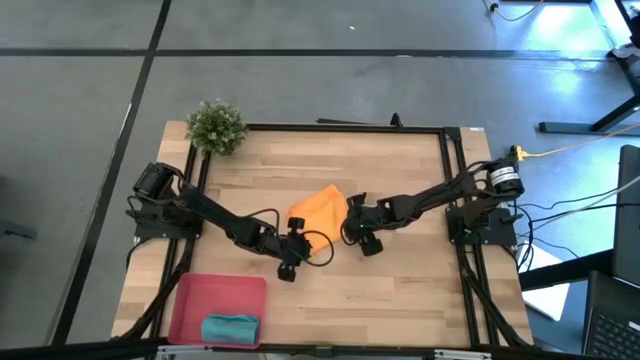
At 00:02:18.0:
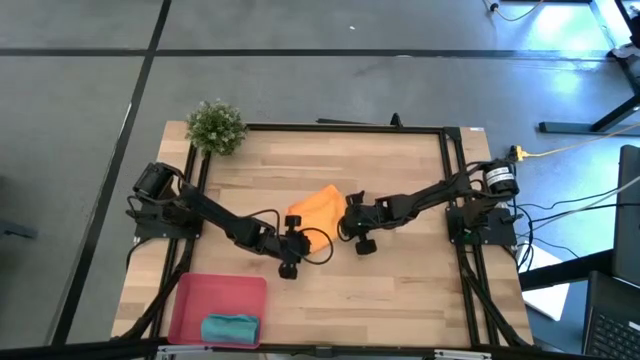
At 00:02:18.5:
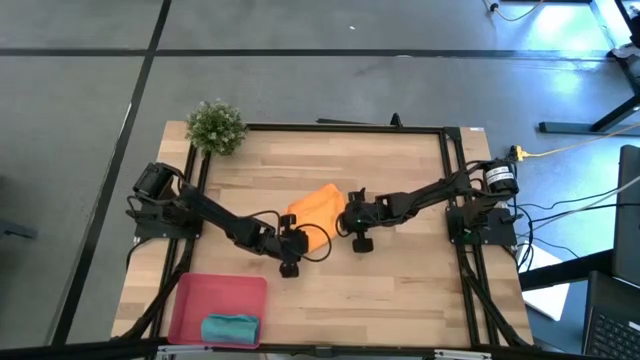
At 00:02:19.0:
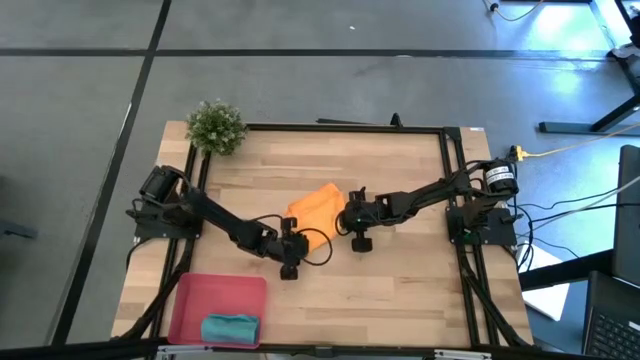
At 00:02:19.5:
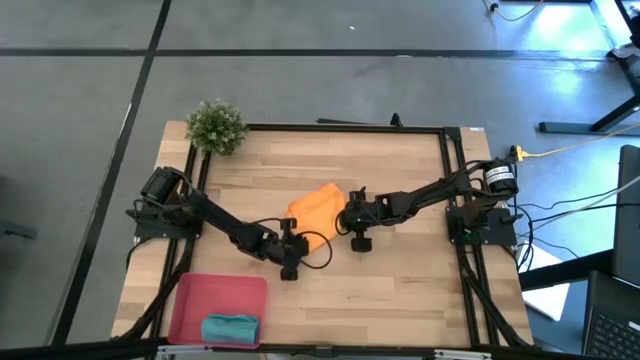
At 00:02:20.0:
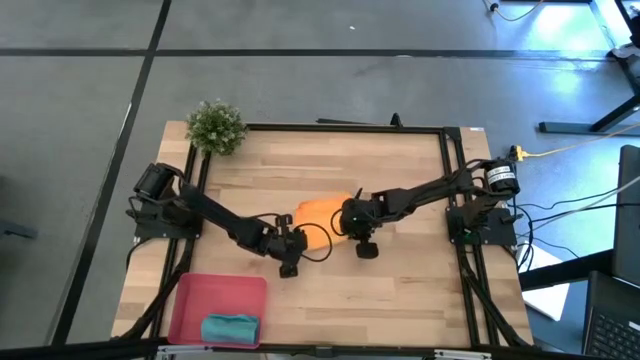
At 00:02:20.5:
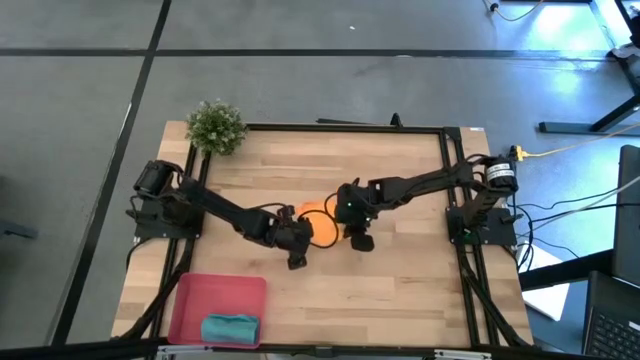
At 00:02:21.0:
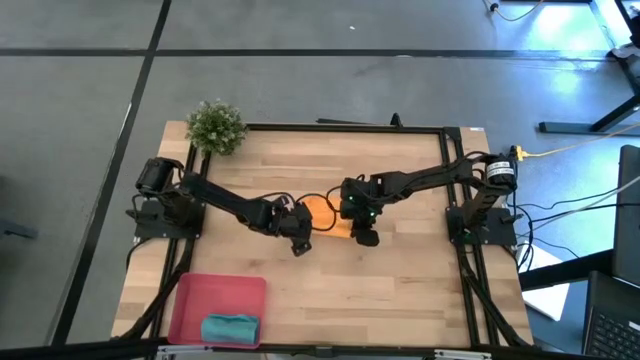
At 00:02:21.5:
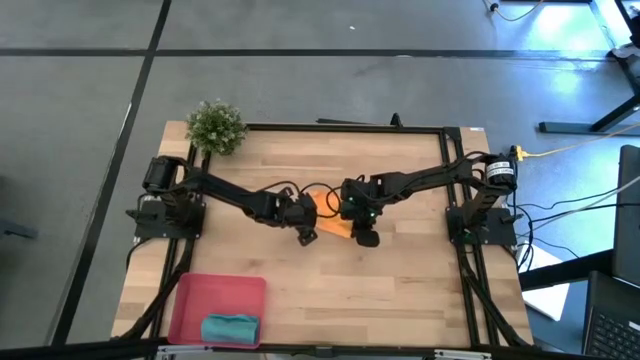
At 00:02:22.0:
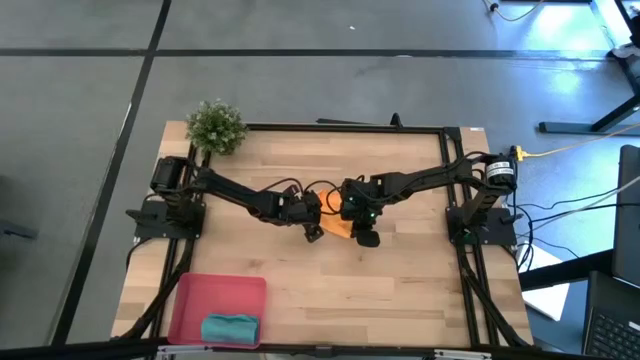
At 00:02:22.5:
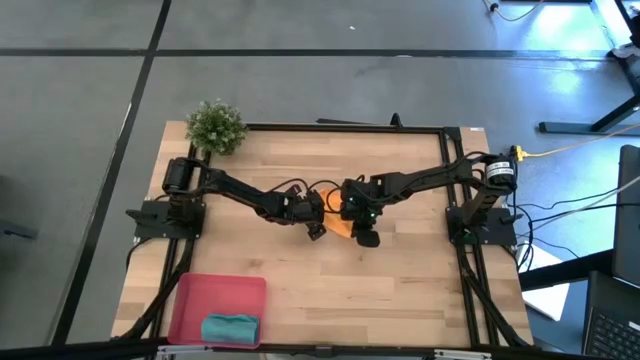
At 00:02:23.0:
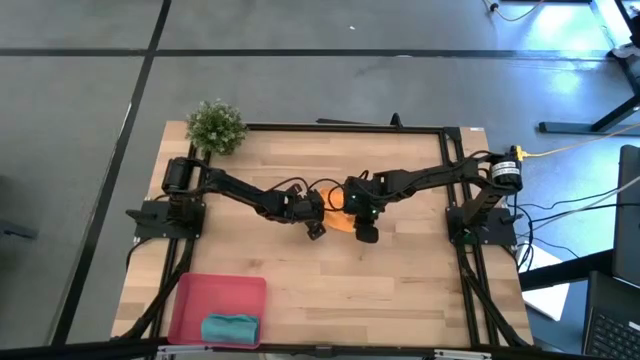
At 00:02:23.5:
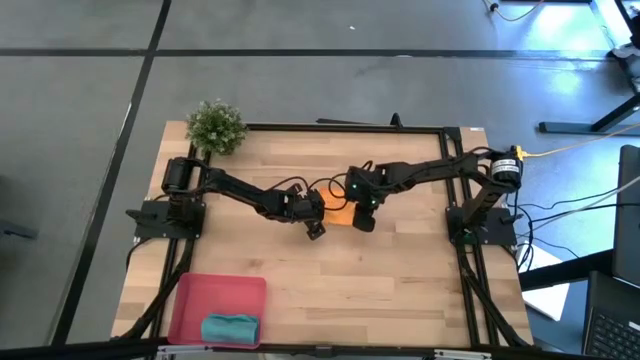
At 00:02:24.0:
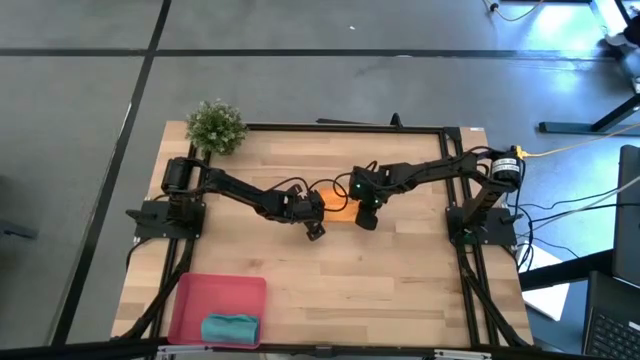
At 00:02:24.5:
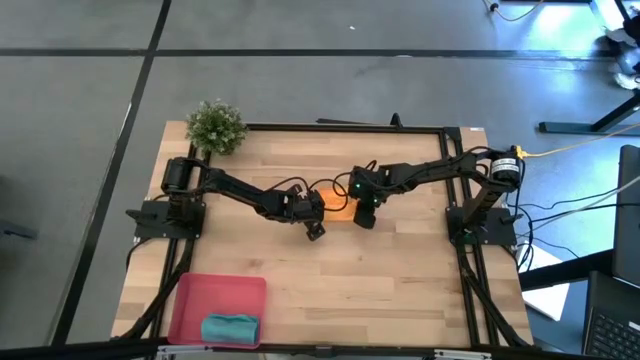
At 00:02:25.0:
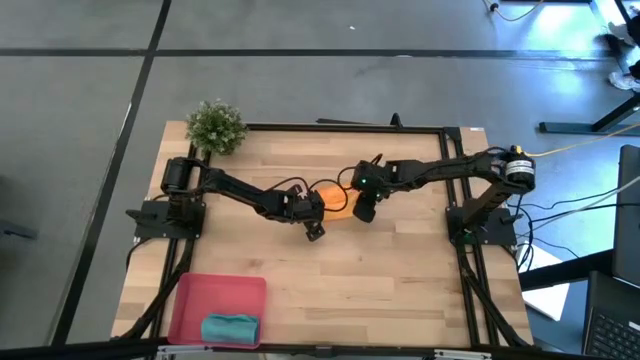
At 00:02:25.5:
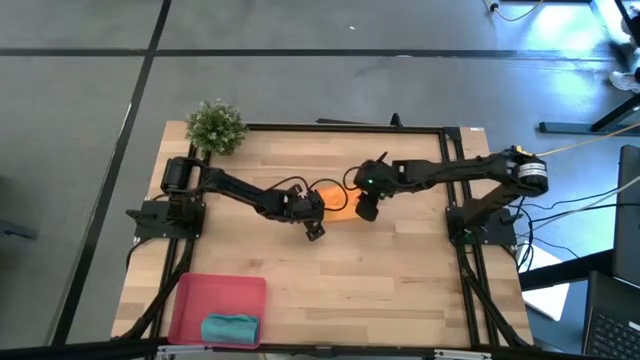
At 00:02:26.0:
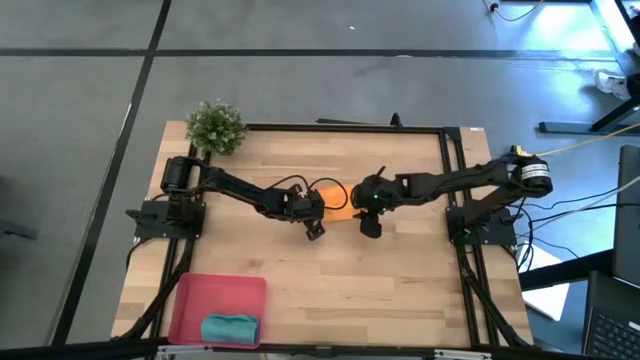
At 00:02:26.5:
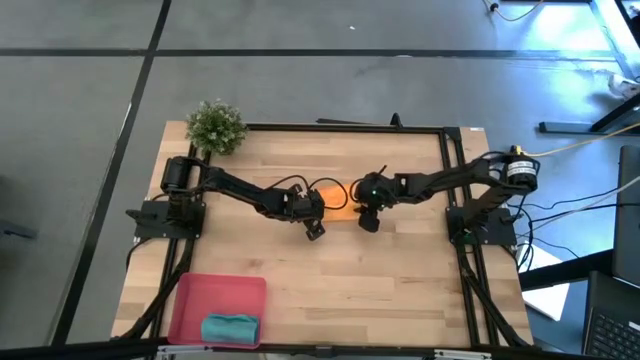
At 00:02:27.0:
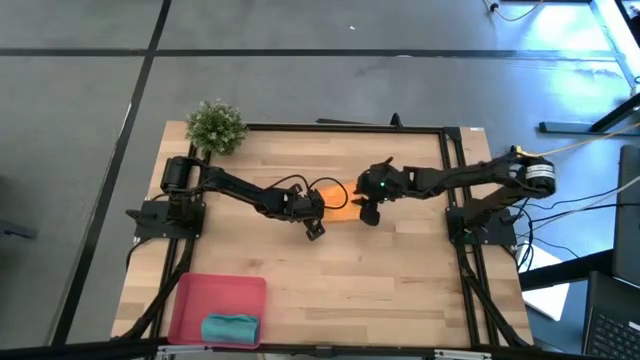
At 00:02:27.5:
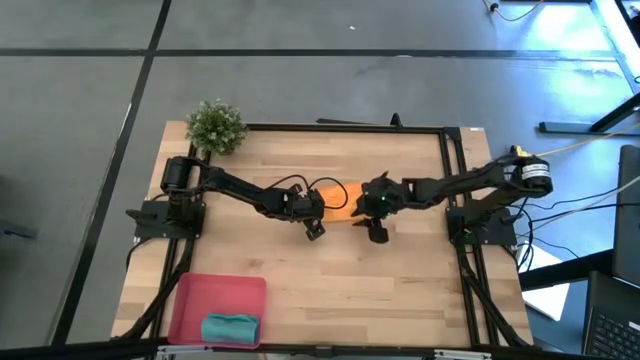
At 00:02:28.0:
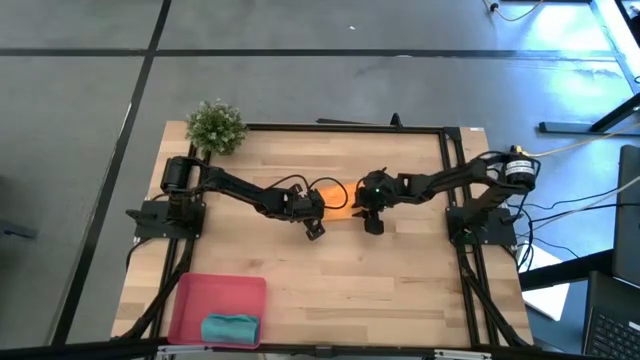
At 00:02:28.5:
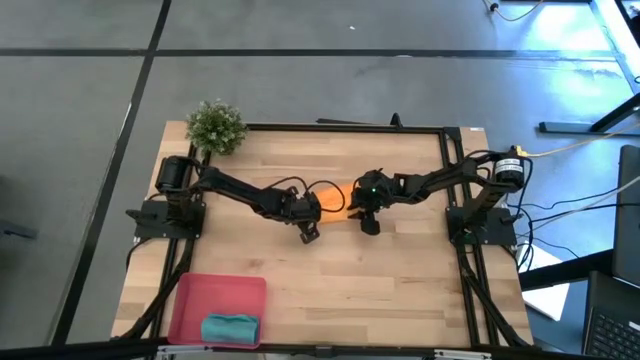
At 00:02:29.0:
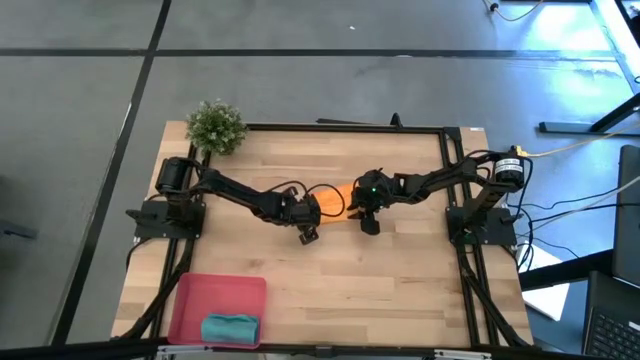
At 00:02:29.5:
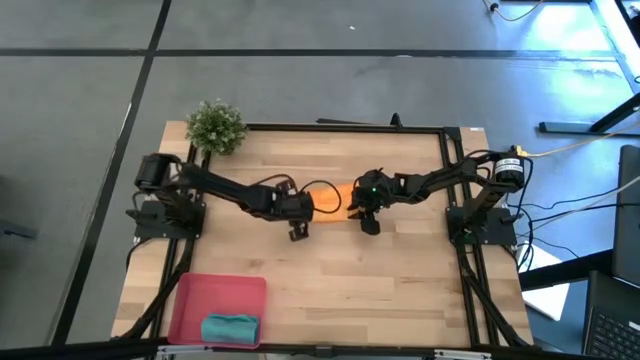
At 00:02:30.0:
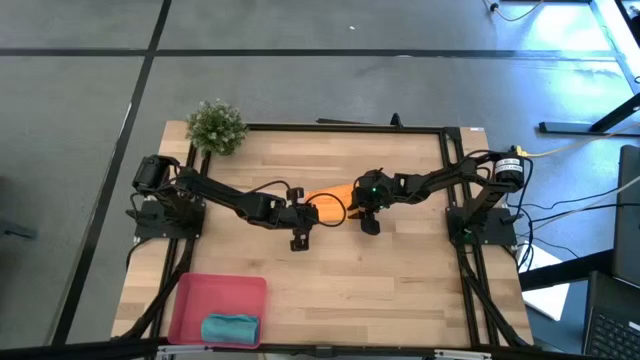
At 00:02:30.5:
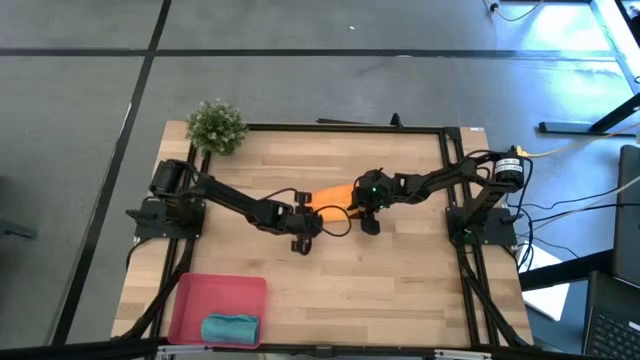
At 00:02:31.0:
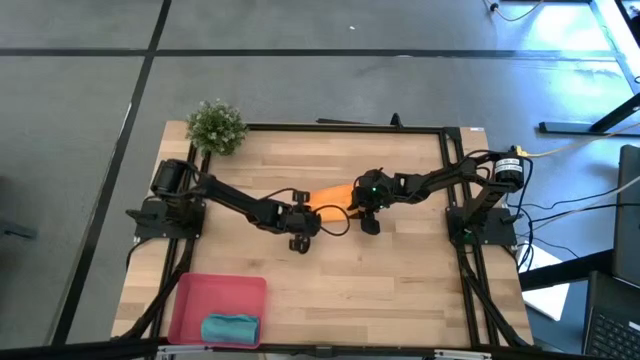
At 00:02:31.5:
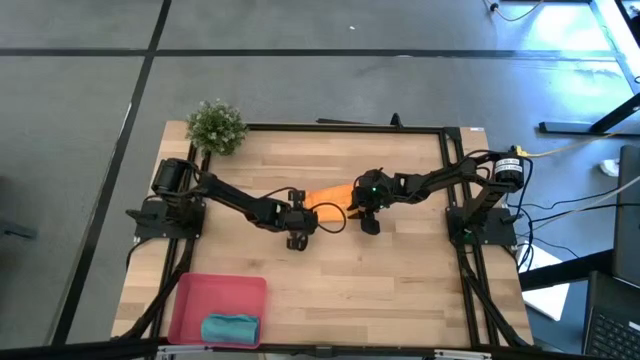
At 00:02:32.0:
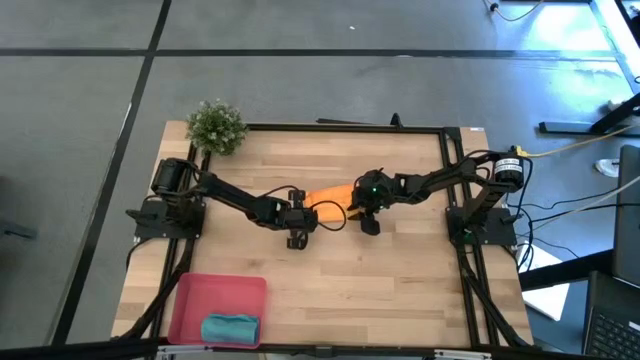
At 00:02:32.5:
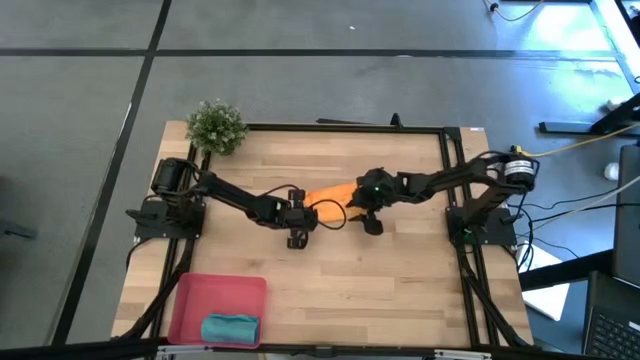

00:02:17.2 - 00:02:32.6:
Task: Roll microfiber towels into tight, uniform cylinder then place into a basket
Roll the orange microfiber towel

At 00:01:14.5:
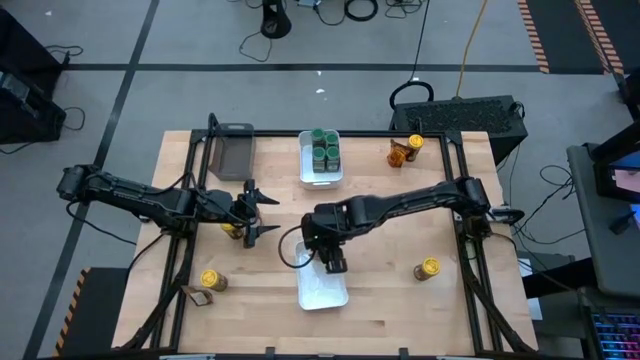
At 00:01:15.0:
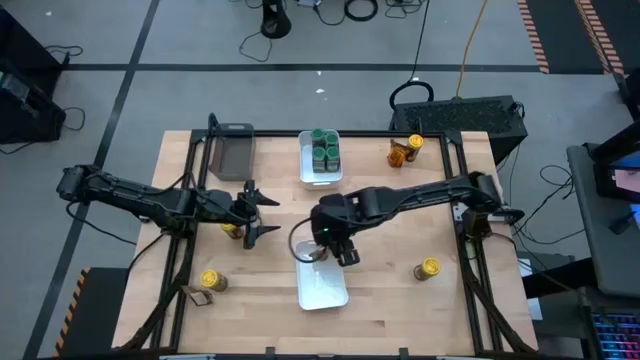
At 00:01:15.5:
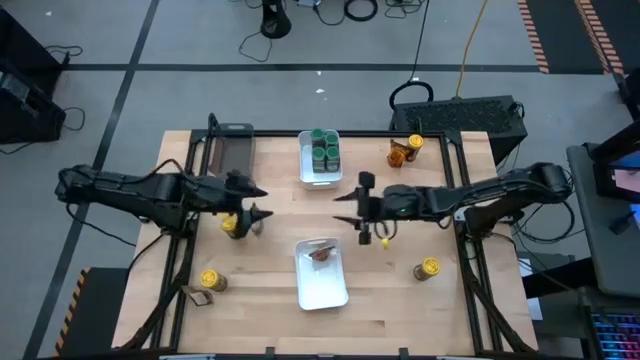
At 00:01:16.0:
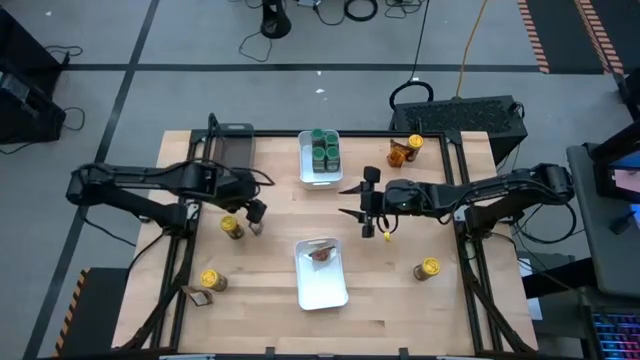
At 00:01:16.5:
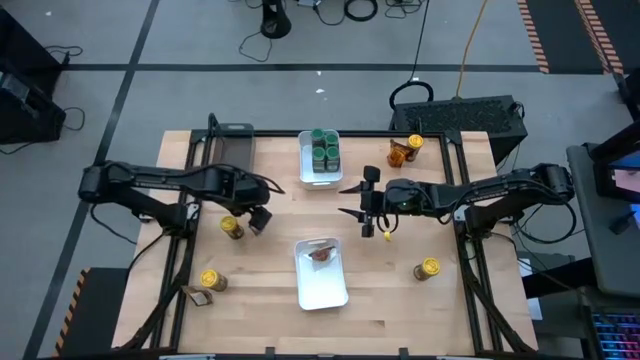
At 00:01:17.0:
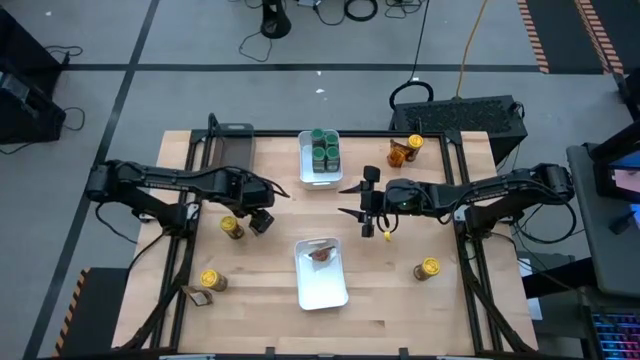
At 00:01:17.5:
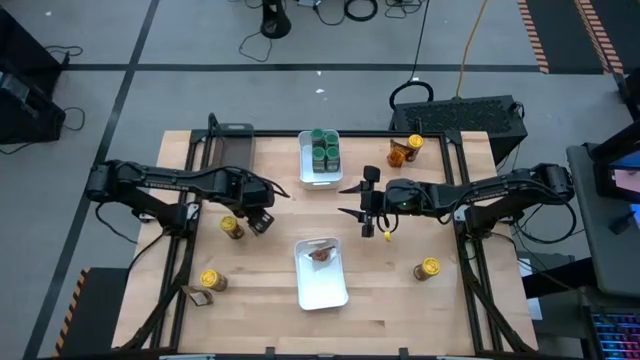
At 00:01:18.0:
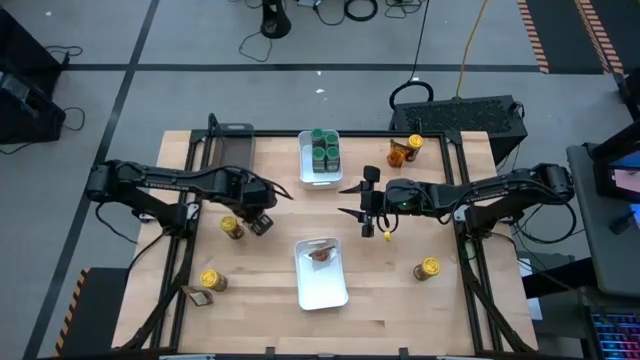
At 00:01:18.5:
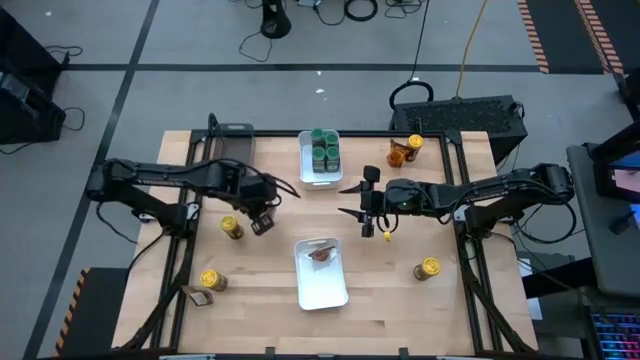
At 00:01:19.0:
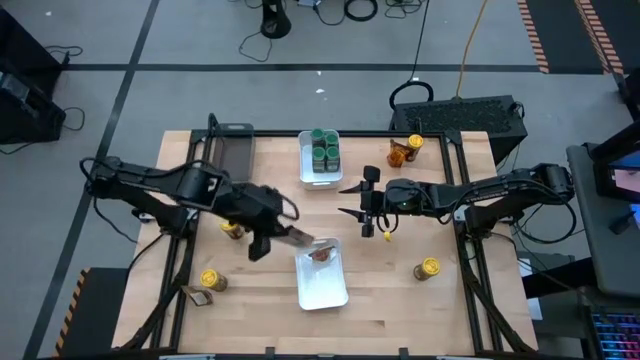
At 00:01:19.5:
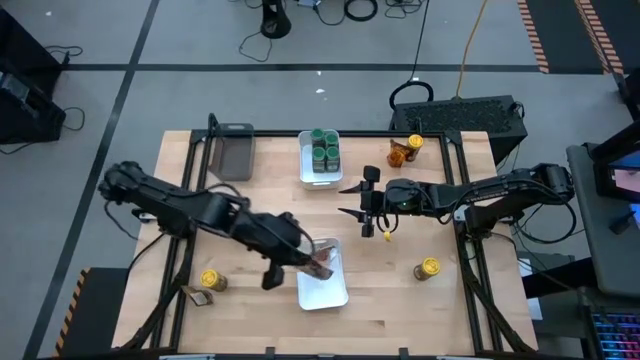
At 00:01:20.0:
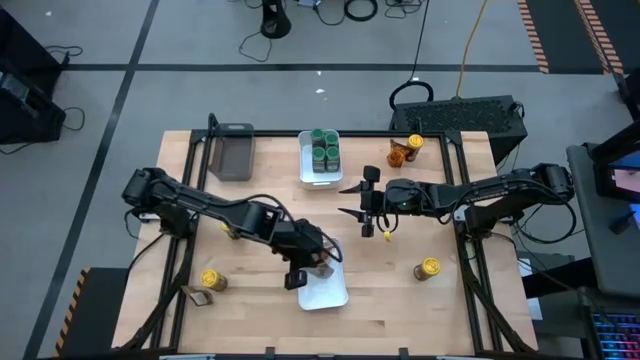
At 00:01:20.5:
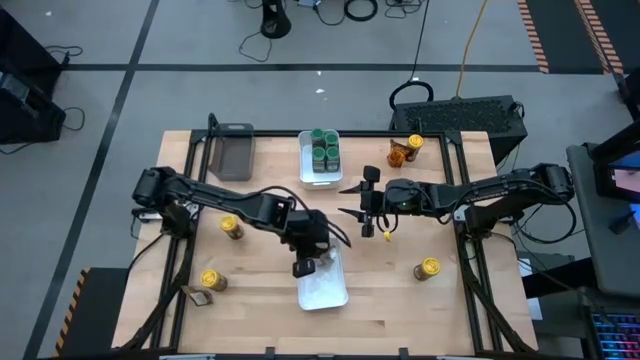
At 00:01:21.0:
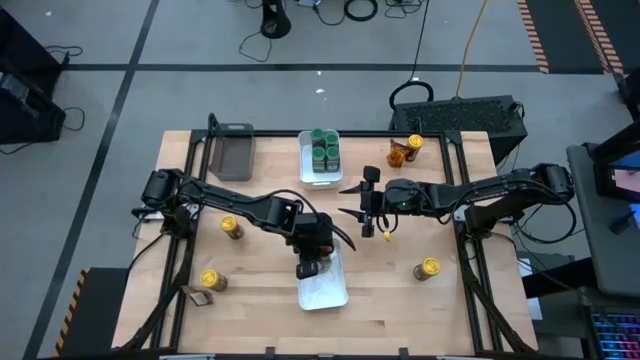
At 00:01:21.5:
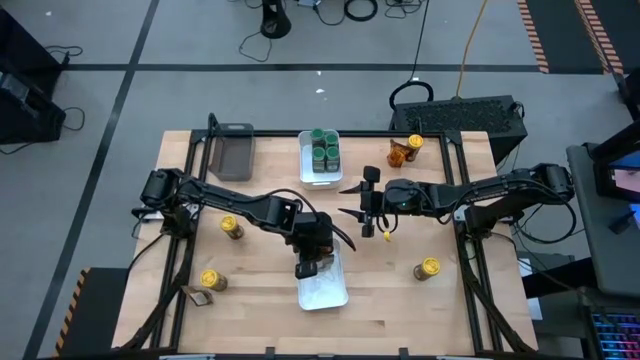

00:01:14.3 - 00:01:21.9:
Task: Sort spices by type
Put the middle left brown spice pack into the bottom white bin
